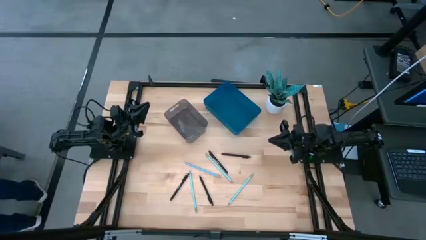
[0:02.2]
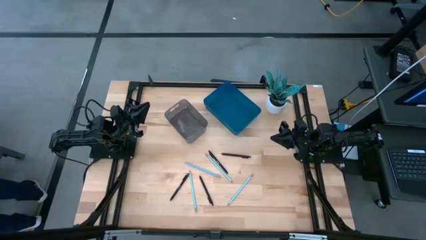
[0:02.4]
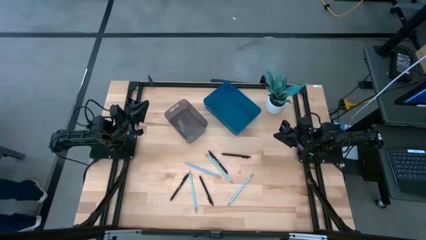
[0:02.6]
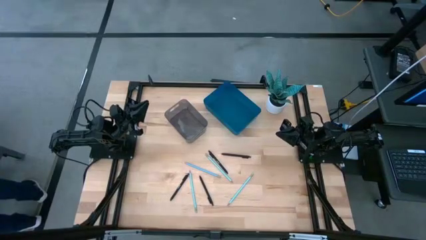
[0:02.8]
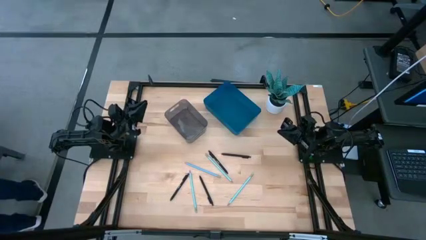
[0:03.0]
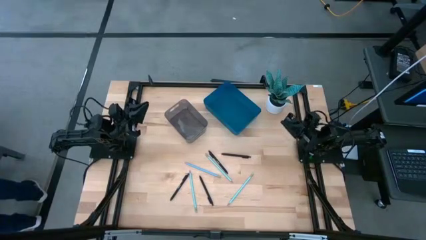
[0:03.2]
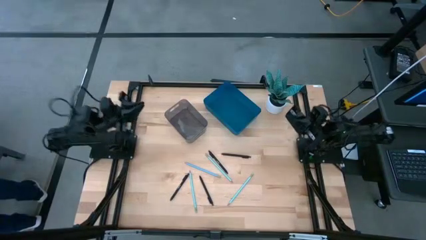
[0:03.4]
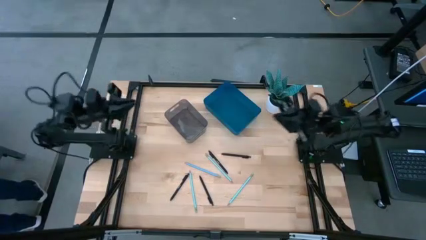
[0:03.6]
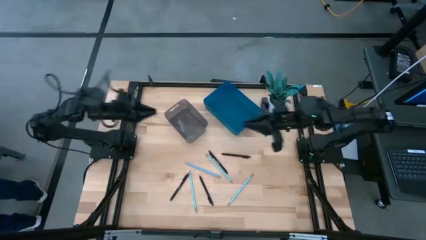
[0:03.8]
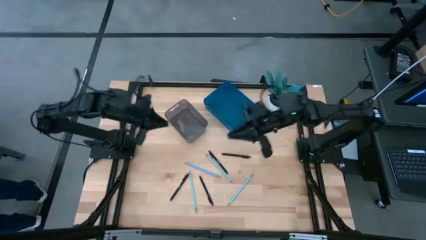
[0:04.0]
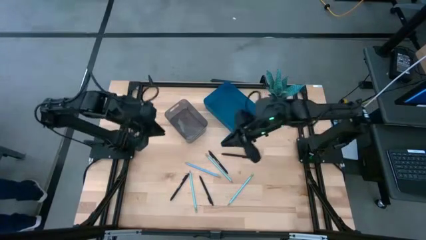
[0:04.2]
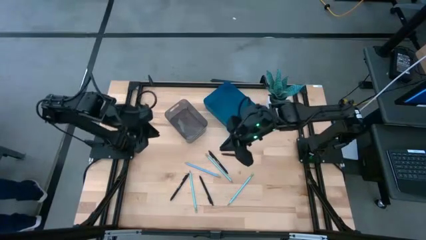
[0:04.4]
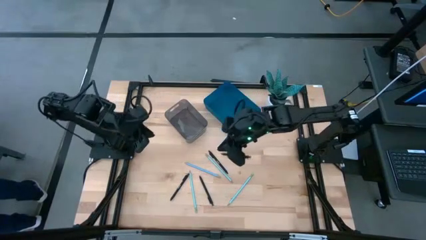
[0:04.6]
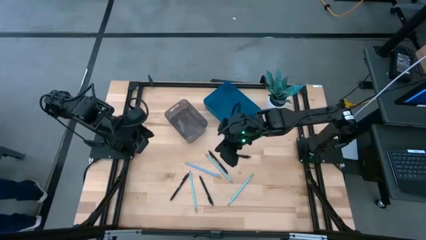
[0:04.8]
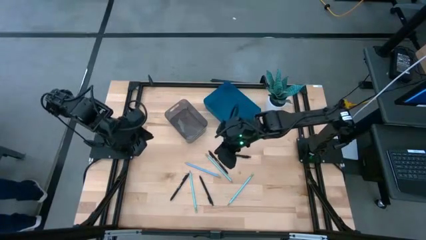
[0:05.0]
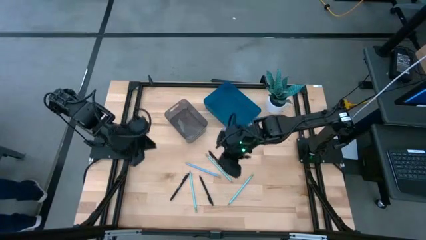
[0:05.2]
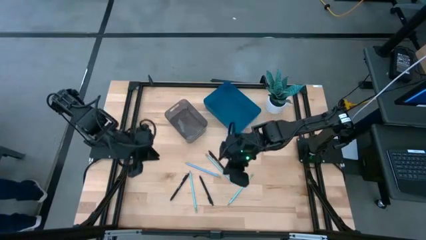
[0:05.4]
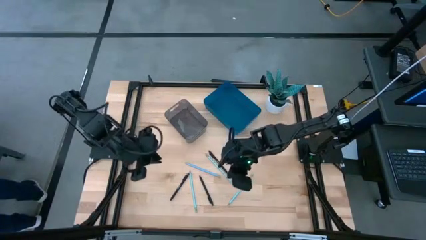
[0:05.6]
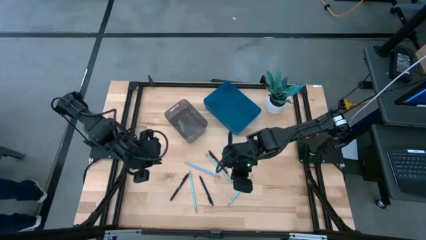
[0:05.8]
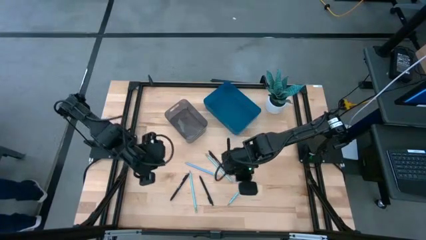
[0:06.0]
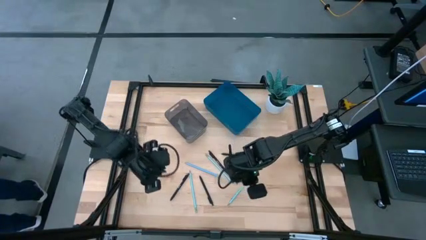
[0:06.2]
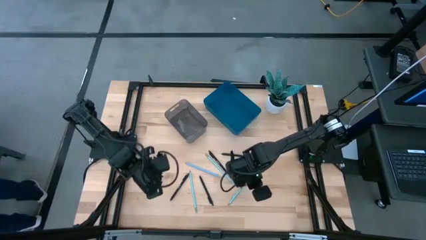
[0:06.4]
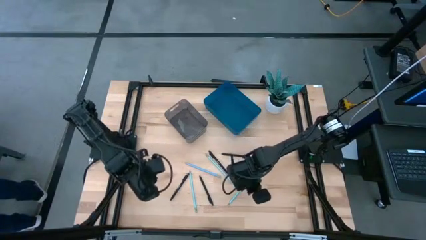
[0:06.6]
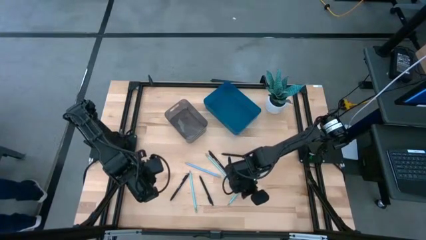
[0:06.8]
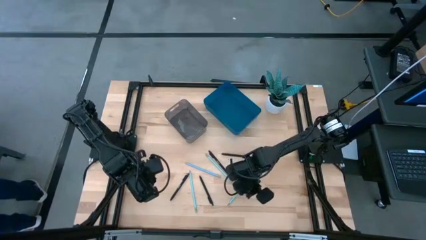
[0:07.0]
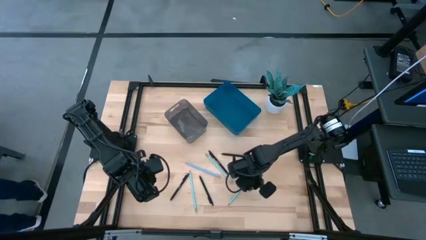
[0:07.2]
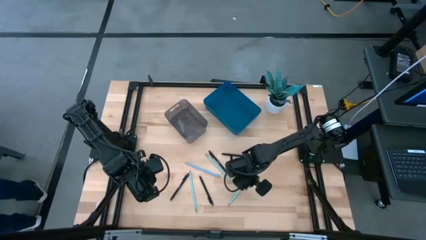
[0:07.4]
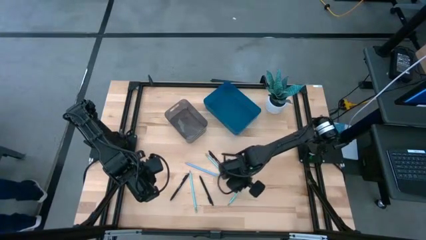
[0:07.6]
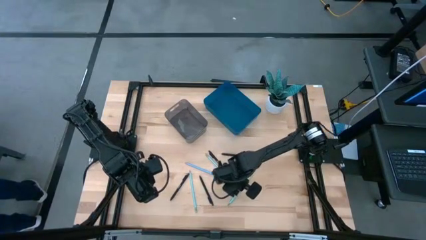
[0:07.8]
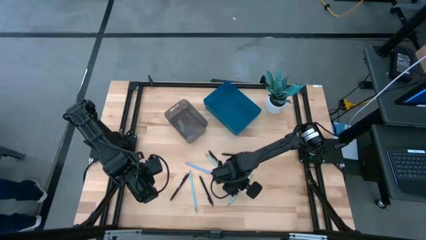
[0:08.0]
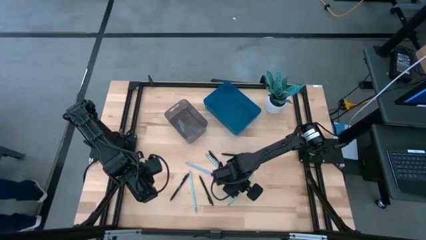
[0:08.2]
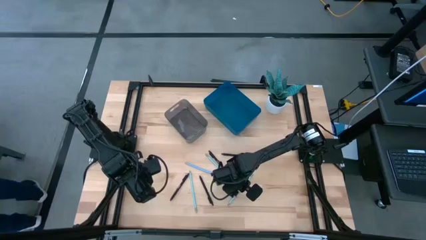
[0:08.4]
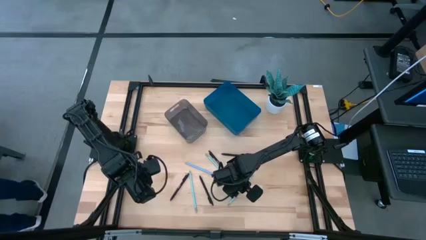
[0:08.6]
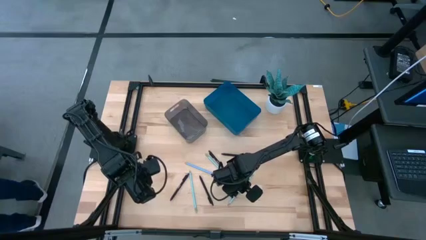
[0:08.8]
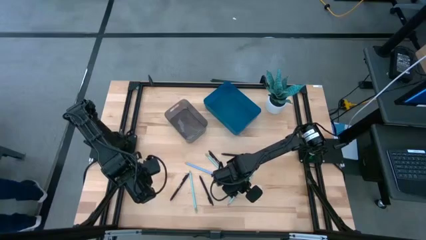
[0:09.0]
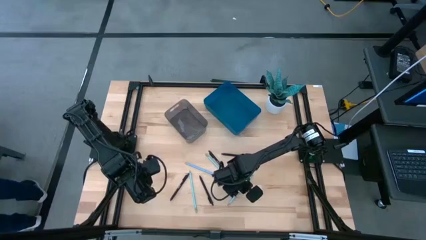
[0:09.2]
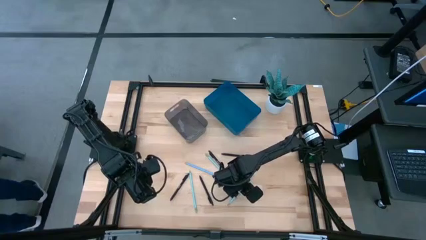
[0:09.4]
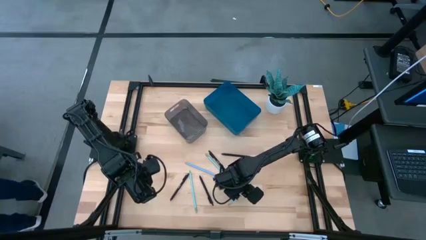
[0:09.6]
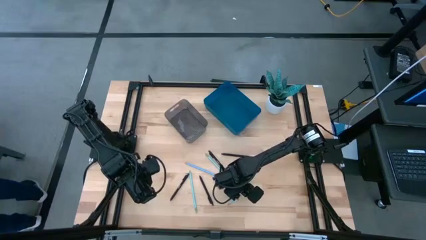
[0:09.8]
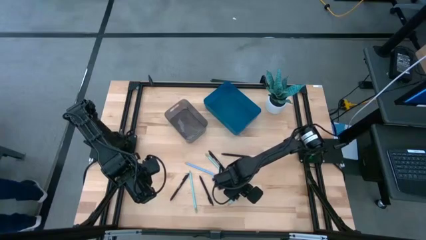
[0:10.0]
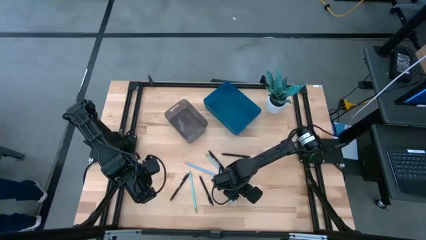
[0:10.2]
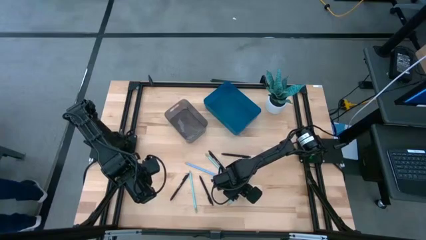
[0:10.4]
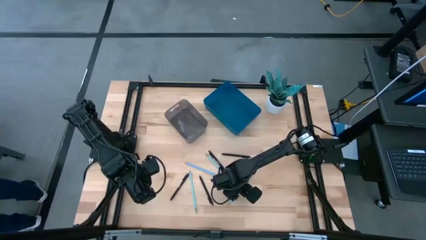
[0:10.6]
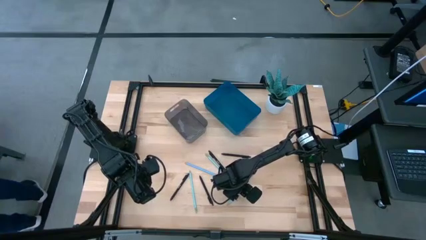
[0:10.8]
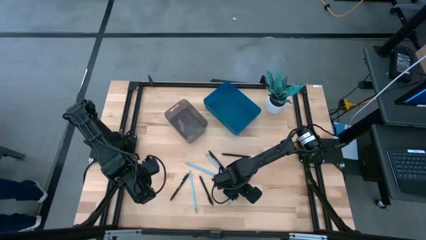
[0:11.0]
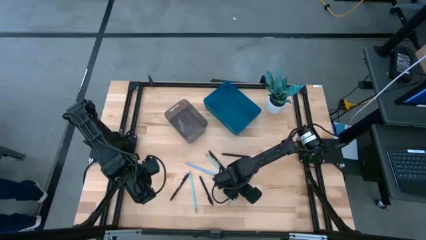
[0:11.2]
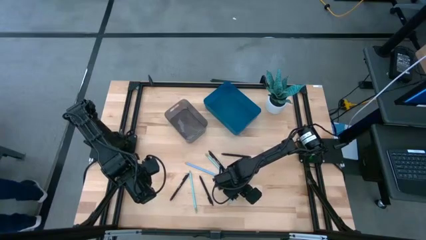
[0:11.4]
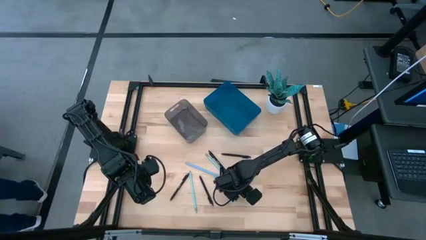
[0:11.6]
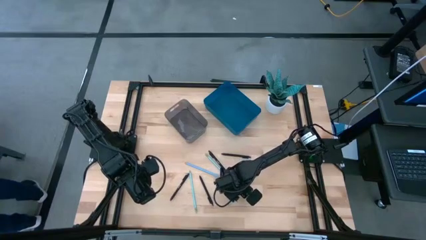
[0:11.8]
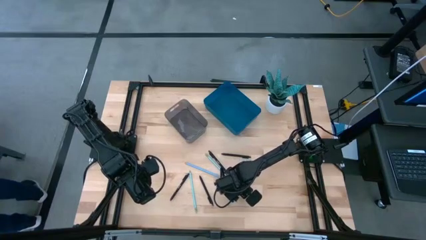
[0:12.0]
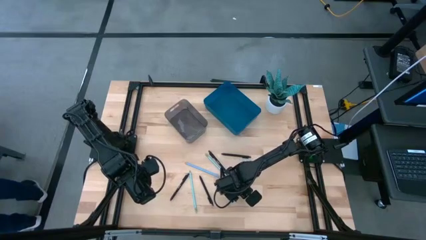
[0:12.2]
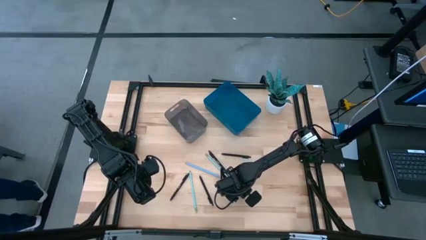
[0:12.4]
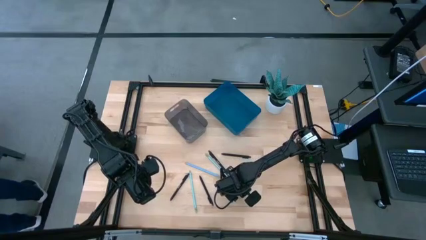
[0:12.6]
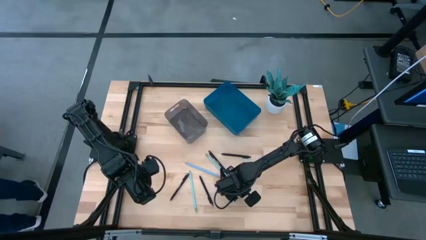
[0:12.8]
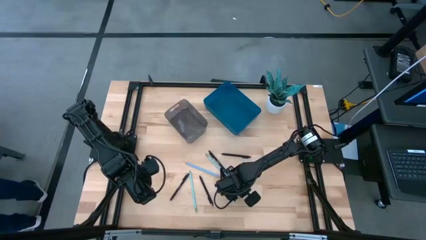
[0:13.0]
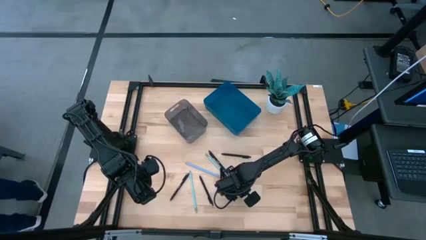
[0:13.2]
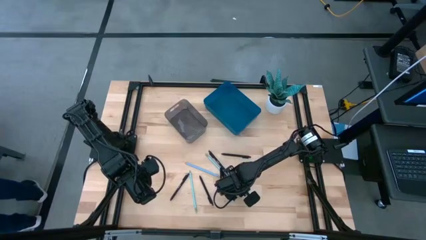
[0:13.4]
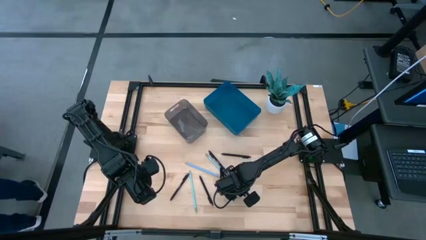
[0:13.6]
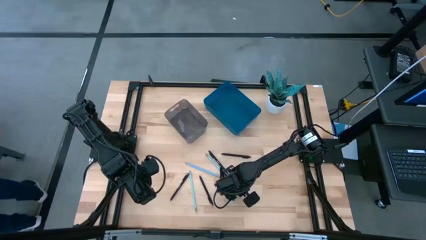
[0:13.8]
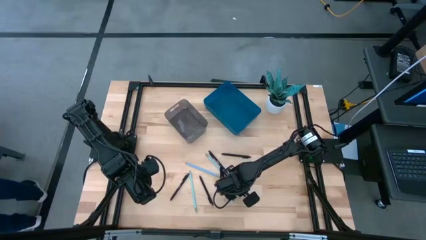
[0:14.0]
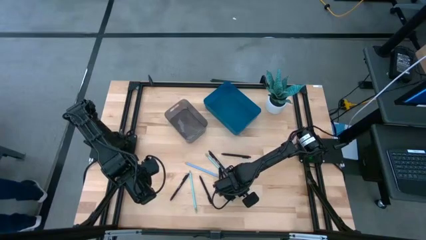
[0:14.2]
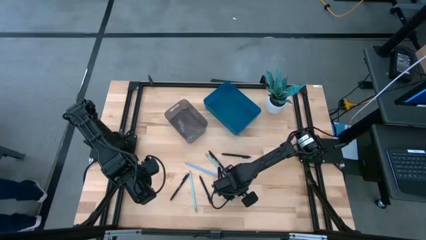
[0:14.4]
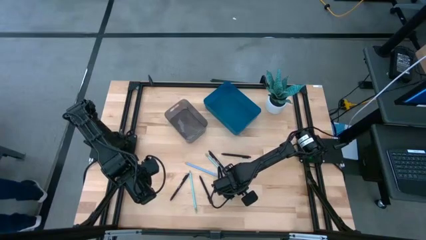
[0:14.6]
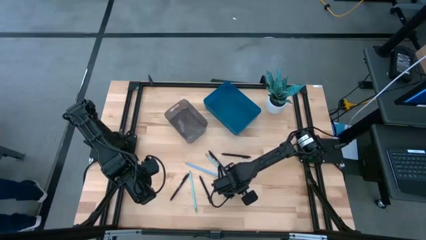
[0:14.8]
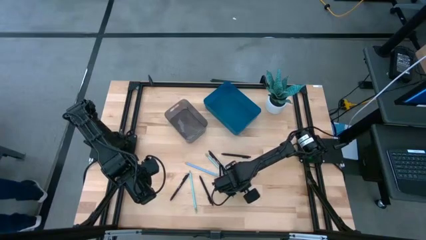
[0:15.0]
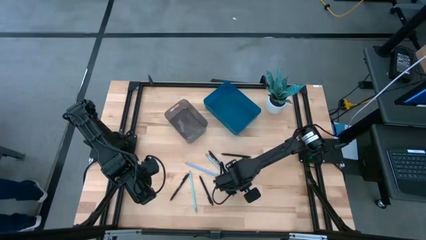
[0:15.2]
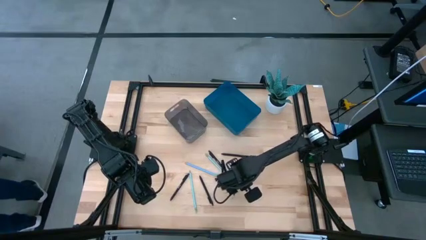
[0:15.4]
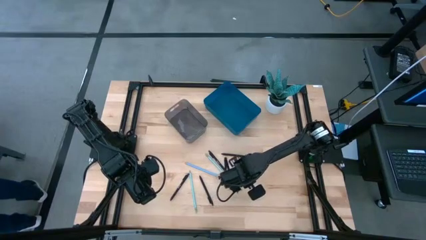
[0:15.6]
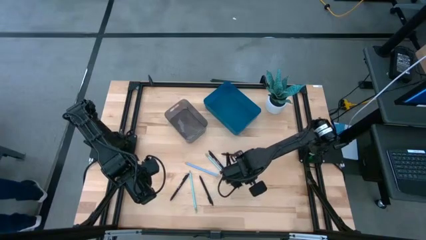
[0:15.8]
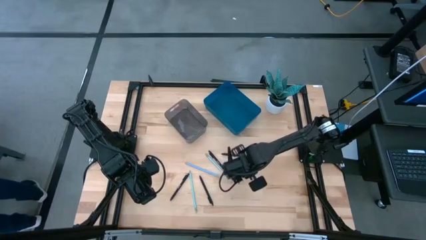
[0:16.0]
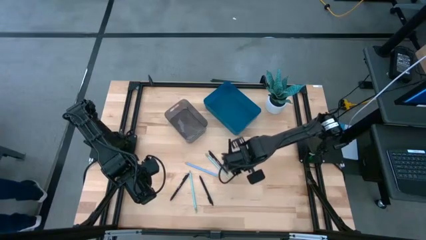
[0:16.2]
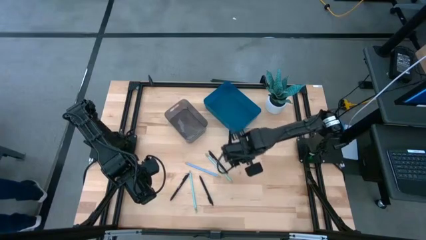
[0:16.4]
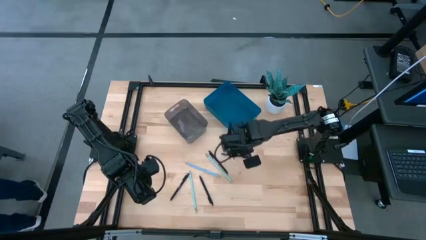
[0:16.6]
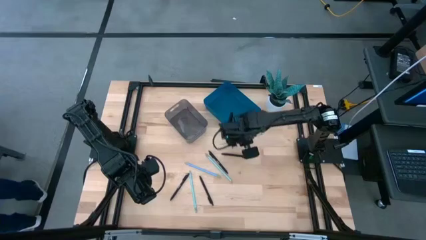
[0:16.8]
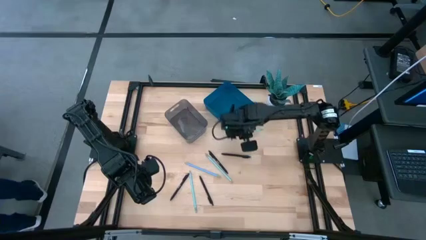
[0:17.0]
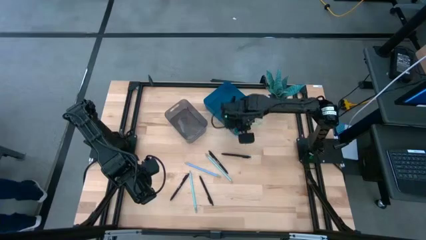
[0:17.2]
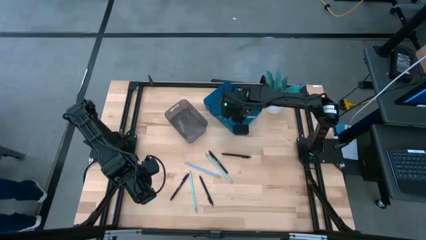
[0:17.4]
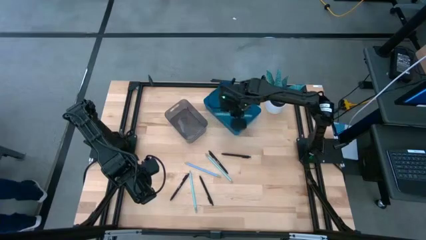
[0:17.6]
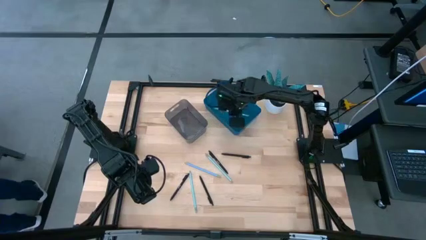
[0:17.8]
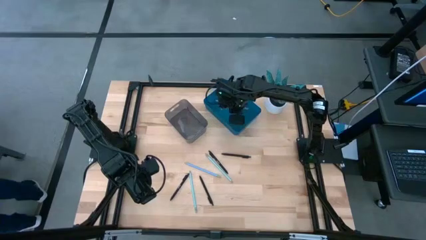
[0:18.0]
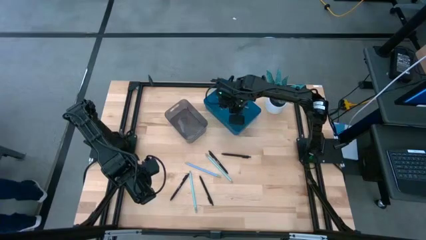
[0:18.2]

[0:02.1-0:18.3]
Task: Sort pens & pencils
Put the light blue pencil into the blue bin
